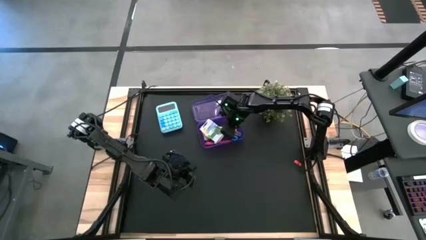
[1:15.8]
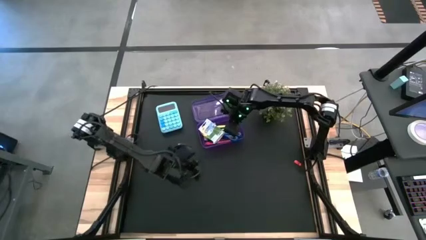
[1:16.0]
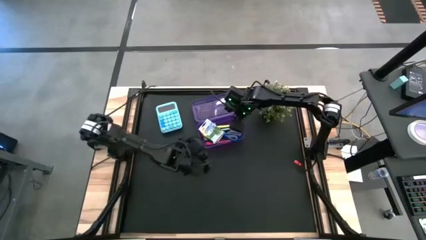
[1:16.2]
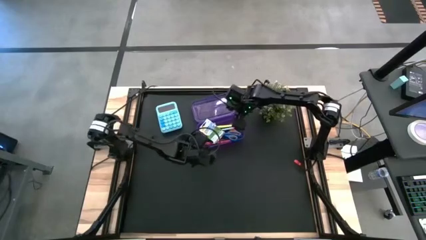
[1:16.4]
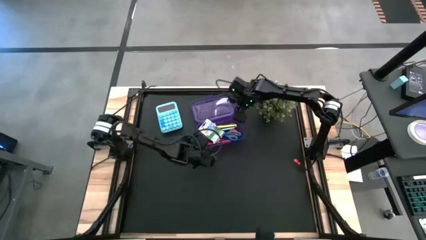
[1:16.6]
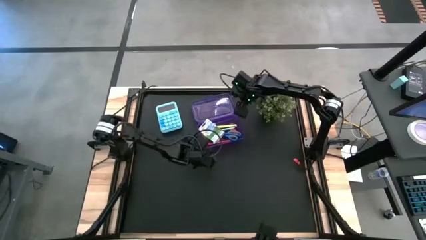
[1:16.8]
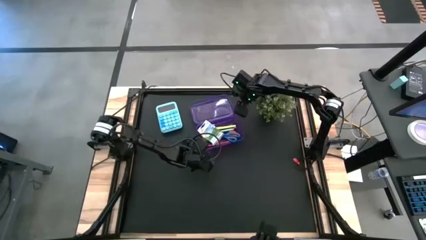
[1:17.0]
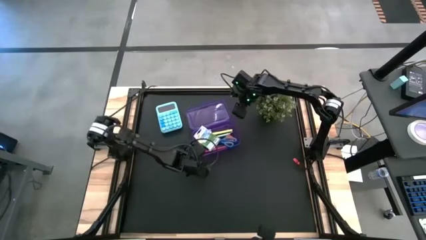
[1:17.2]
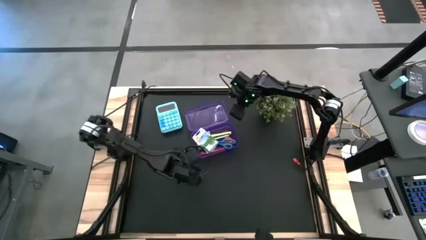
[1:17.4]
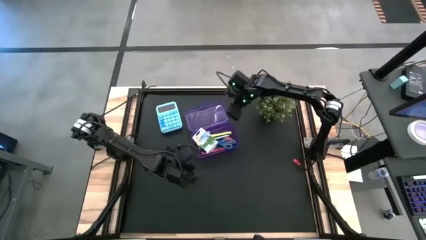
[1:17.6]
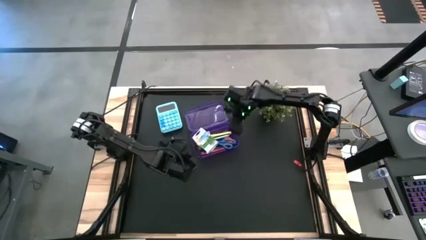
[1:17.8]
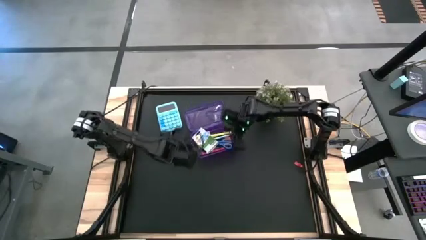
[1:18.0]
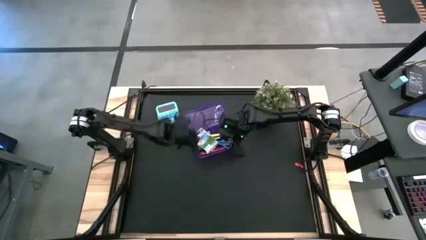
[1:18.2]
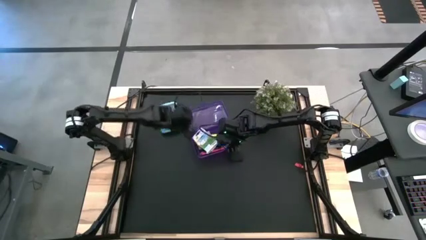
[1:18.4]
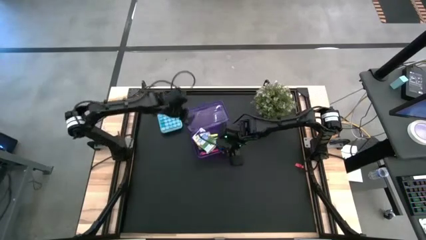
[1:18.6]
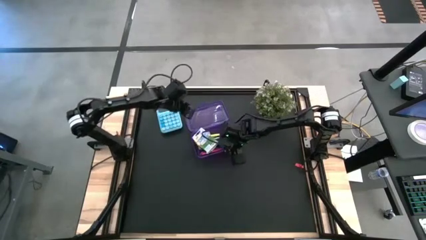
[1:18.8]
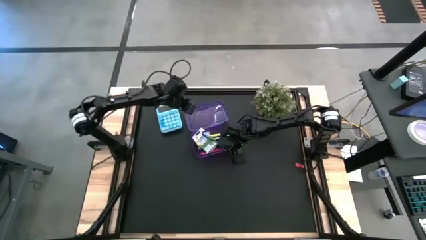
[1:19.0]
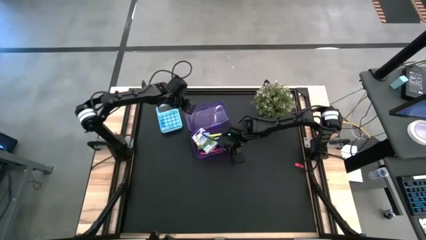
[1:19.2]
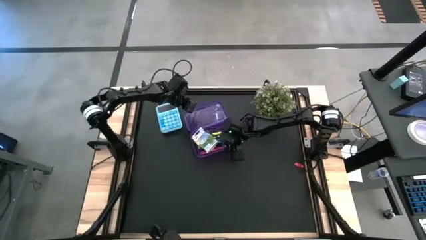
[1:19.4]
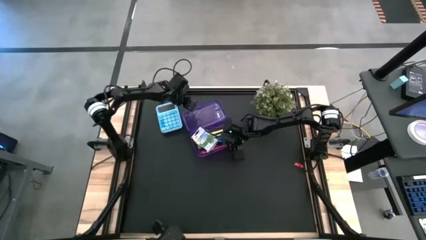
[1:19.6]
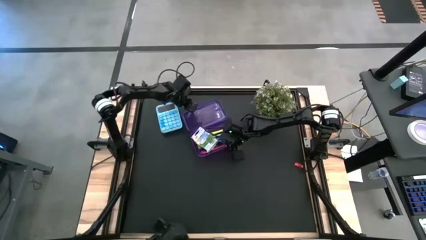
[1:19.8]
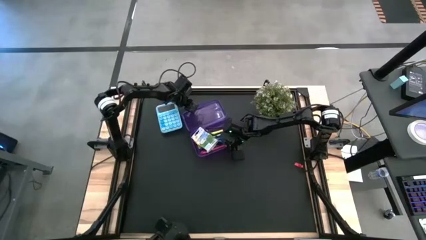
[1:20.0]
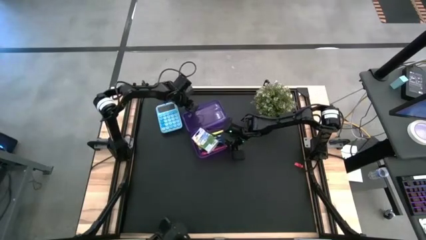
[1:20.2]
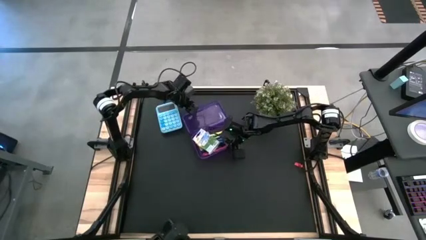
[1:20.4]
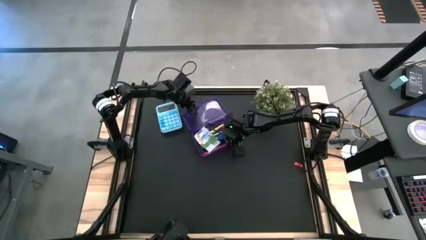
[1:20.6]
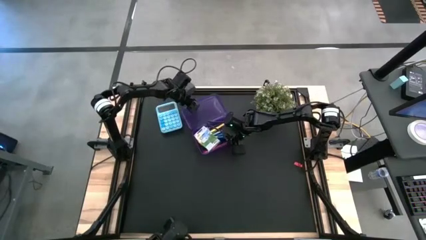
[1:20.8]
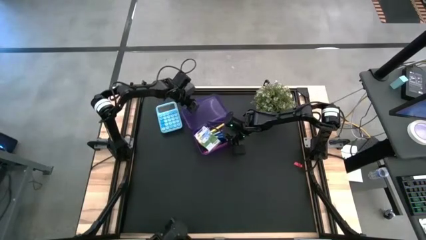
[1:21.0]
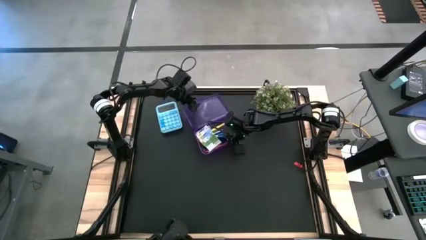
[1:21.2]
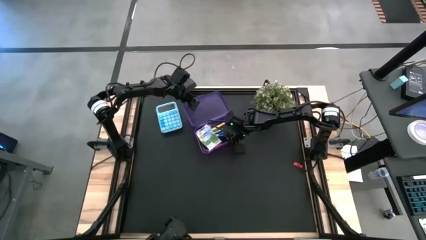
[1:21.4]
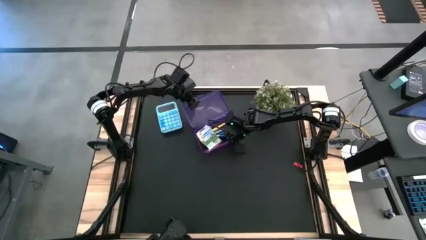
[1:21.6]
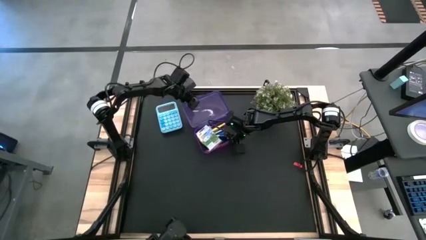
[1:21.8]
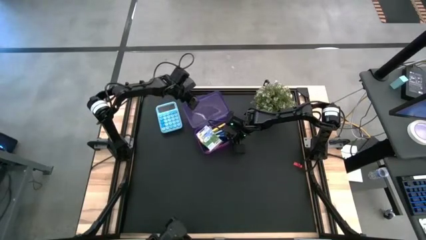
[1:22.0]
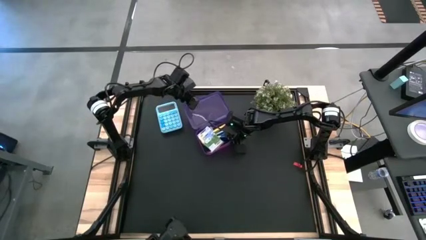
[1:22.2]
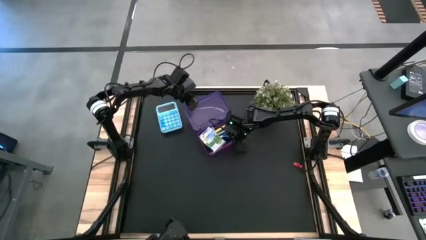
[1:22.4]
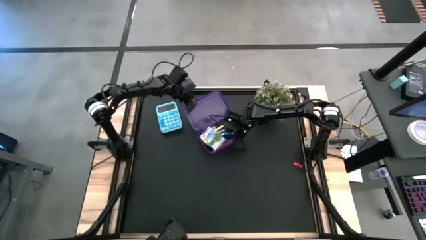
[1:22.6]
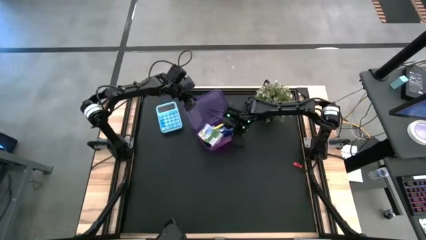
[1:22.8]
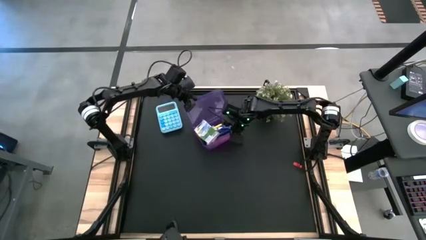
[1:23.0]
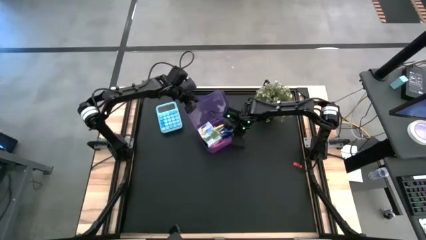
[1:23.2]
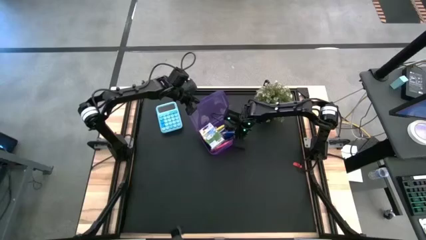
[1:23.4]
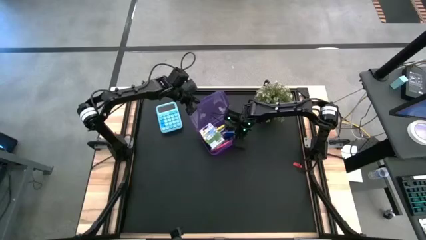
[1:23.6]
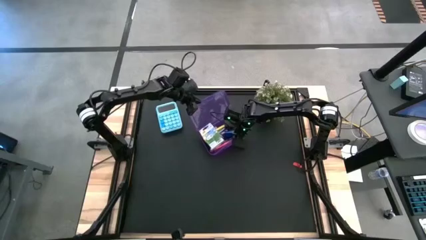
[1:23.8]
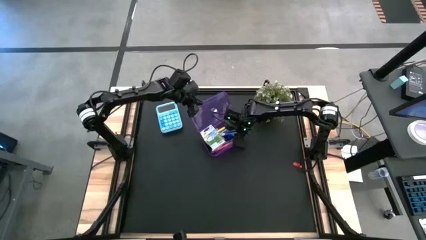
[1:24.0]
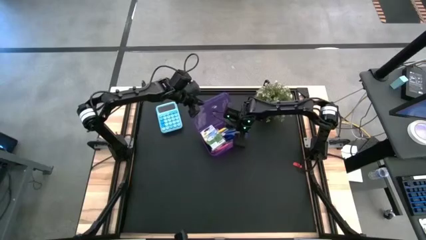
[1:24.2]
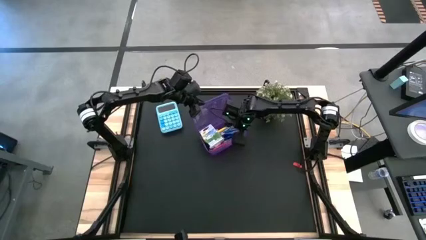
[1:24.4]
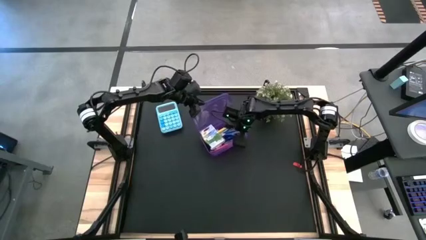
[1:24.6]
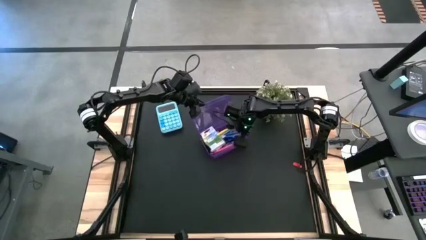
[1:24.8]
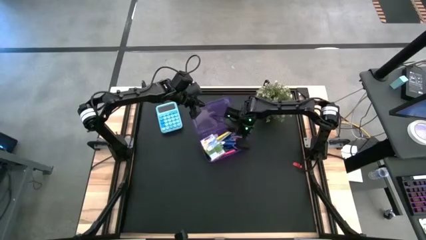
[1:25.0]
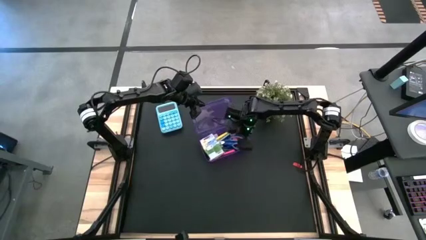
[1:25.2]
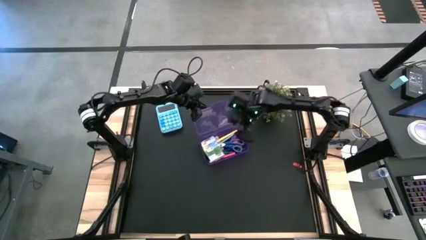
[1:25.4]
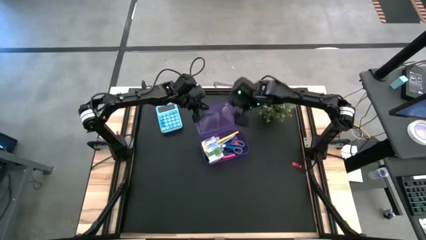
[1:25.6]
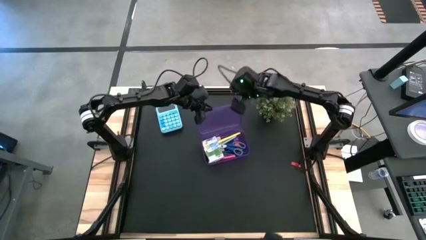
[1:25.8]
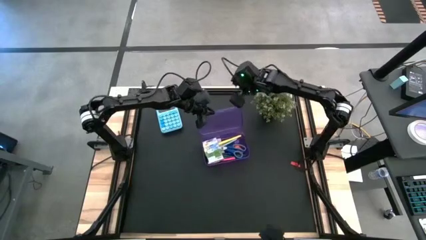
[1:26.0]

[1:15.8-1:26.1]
Task: Pack school essentials
Close the purple supply box

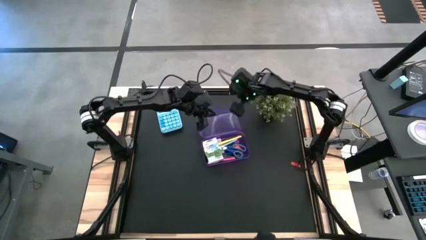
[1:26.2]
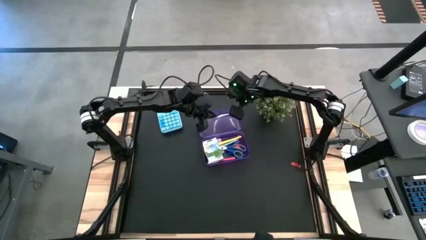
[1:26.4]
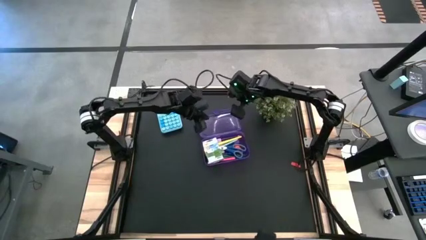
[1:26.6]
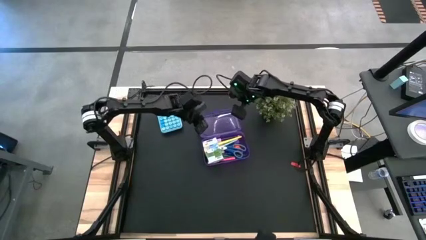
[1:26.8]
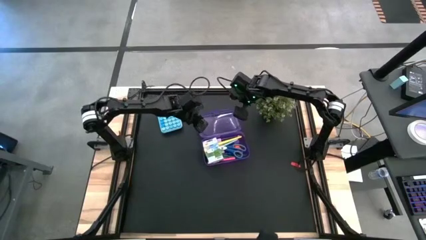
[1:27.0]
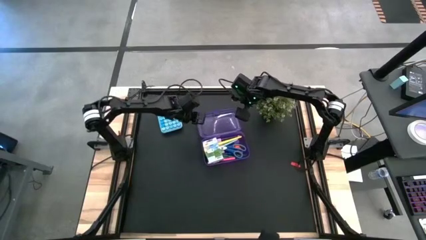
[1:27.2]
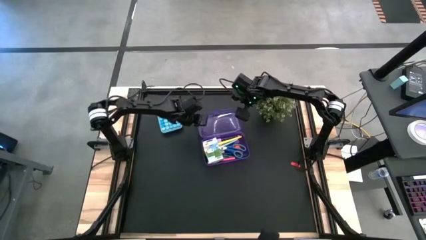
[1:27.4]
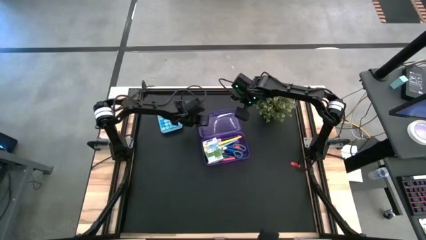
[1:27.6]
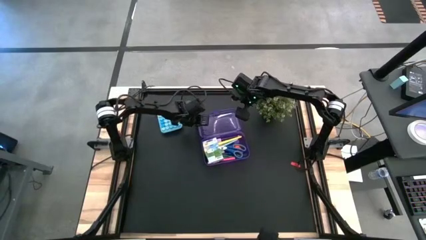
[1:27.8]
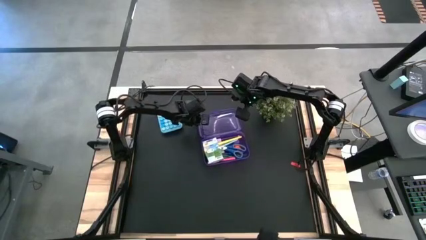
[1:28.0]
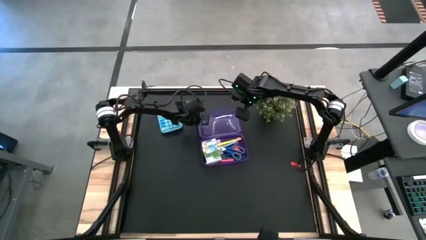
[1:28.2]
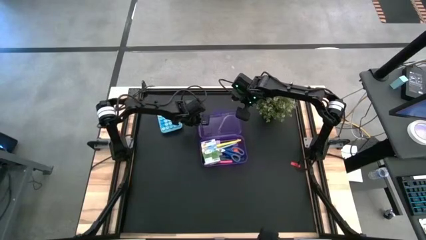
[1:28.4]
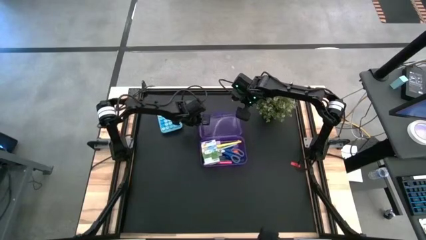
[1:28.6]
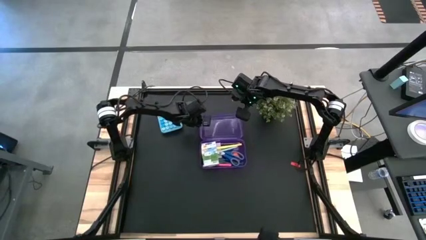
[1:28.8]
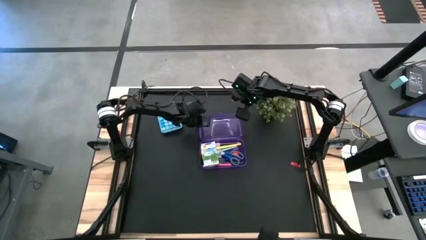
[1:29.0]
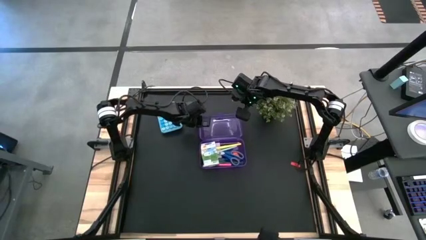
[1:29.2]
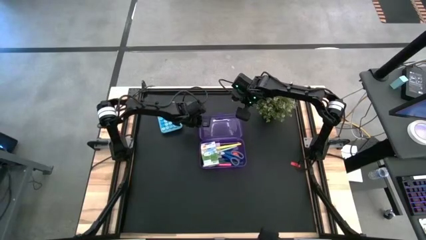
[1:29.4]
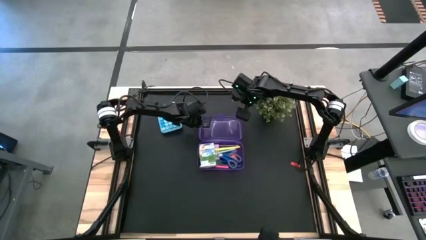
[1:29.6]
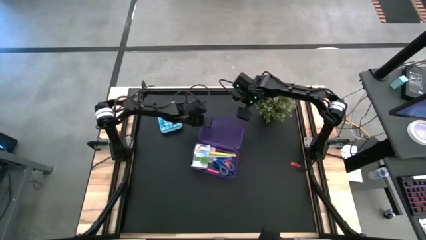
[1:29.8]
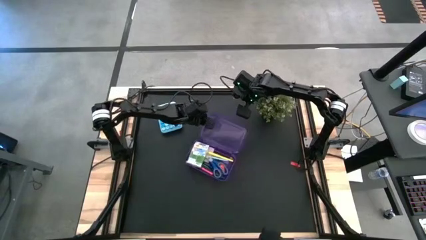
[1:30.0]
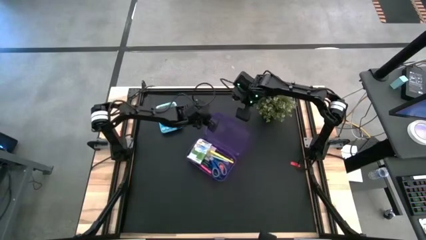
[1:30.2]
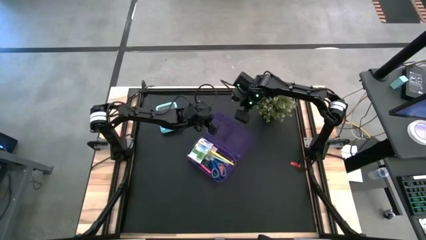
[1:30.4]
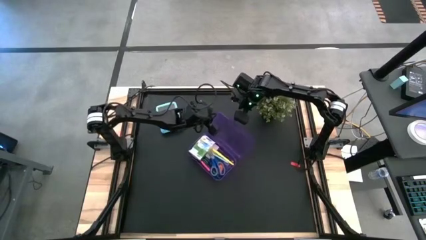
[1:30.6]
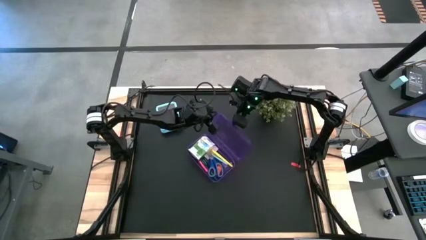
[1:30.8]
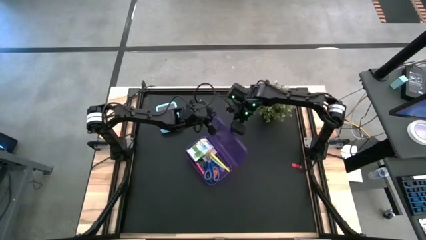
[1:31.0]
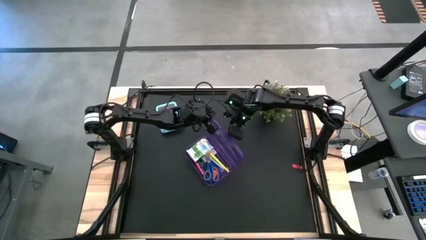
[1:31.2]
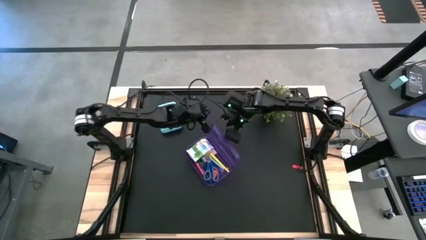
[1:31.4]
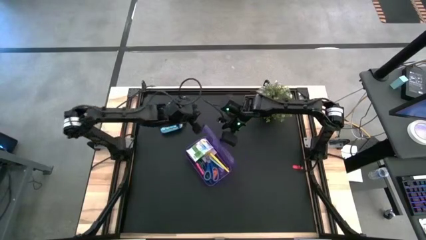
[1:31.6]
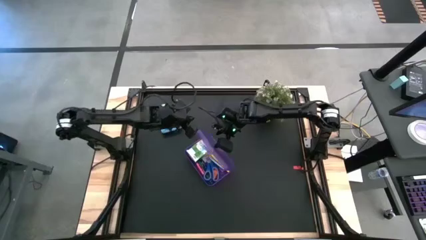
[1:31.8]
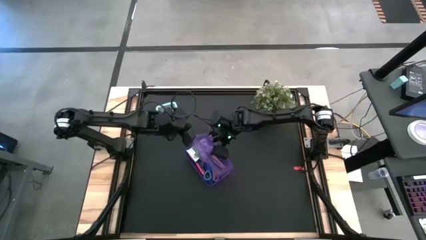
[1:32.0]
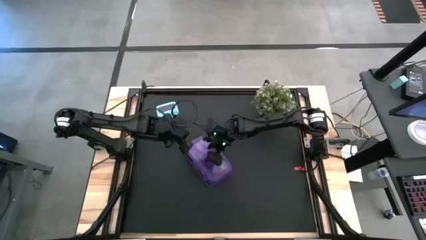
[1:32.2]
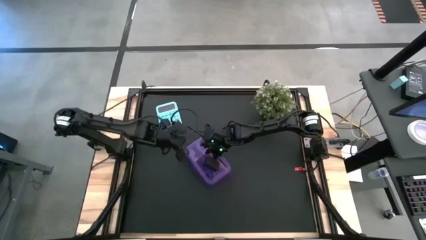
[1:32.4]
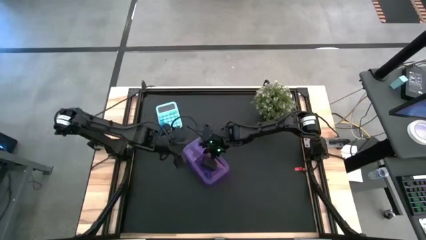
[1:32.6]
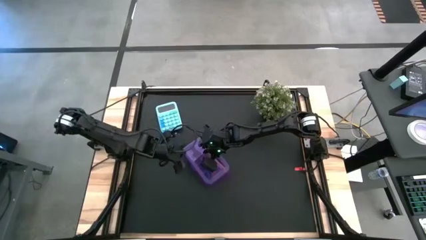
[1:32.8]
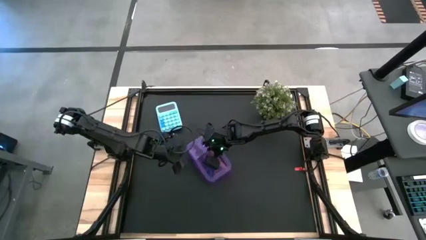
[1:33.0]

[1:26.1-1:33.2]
Close the purple supply box
